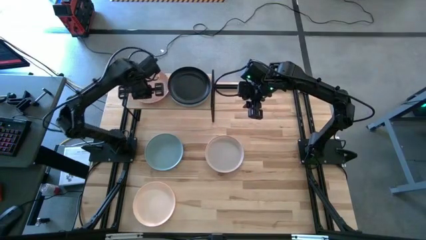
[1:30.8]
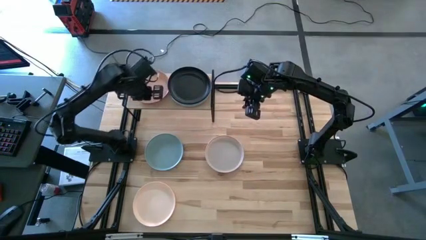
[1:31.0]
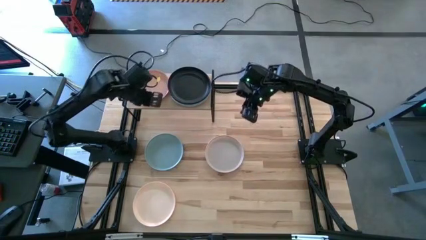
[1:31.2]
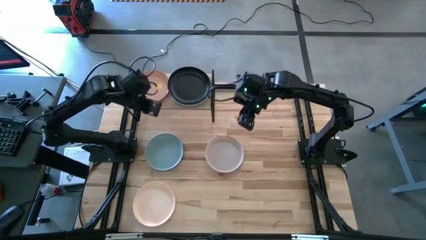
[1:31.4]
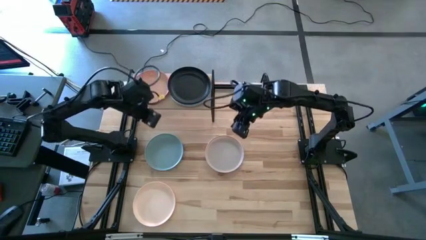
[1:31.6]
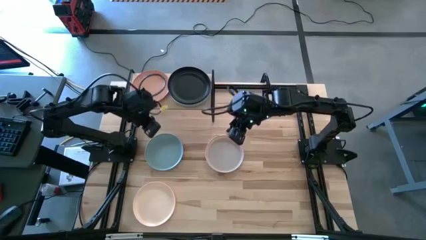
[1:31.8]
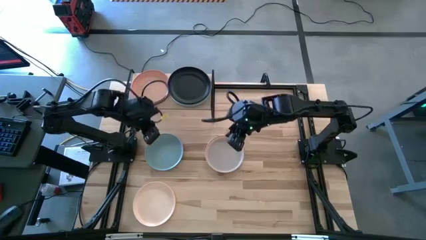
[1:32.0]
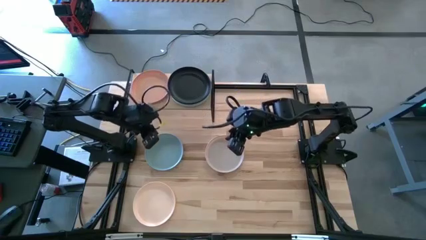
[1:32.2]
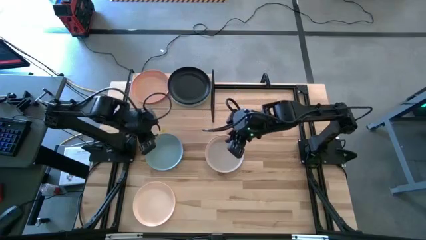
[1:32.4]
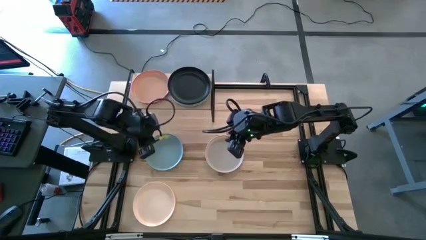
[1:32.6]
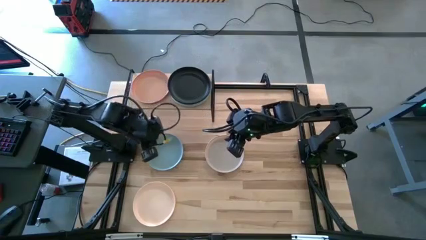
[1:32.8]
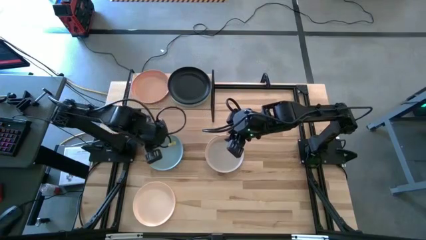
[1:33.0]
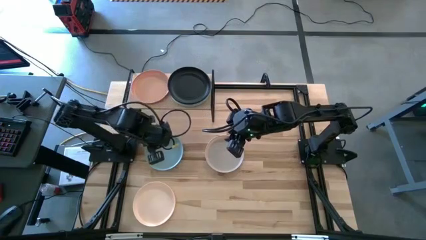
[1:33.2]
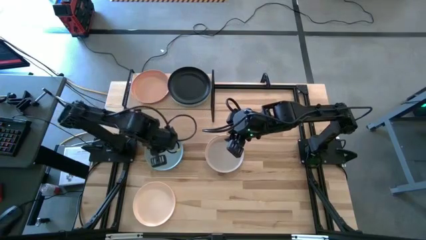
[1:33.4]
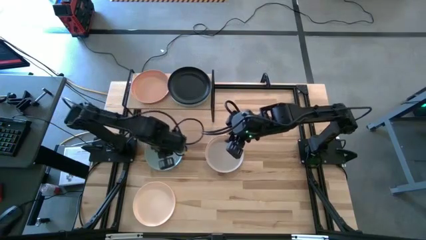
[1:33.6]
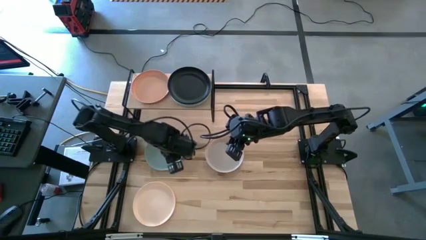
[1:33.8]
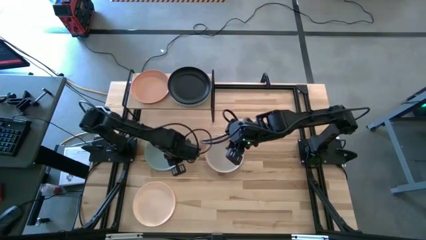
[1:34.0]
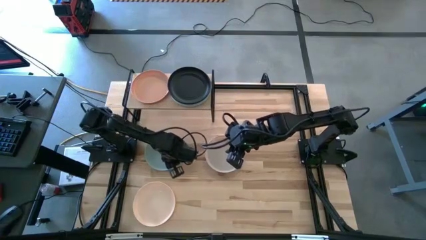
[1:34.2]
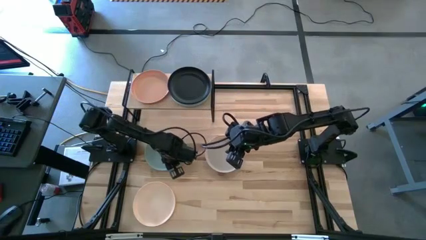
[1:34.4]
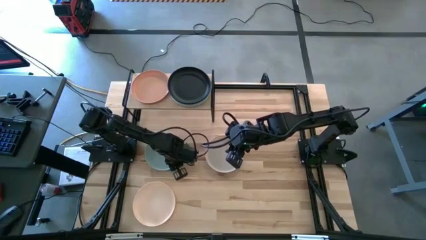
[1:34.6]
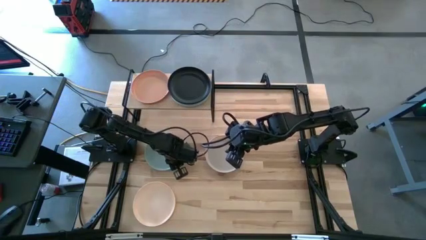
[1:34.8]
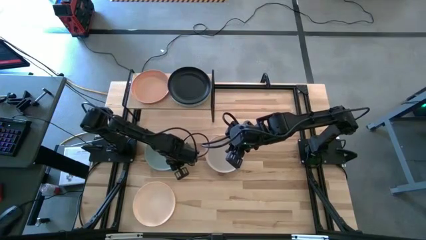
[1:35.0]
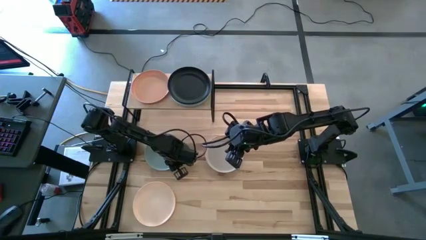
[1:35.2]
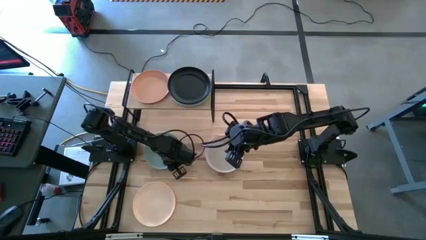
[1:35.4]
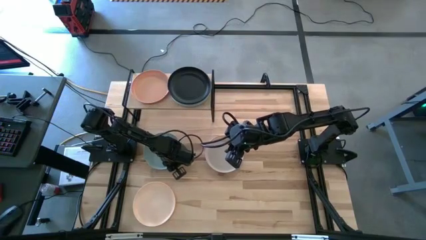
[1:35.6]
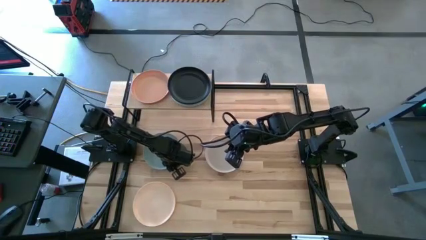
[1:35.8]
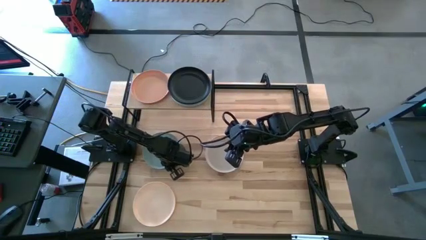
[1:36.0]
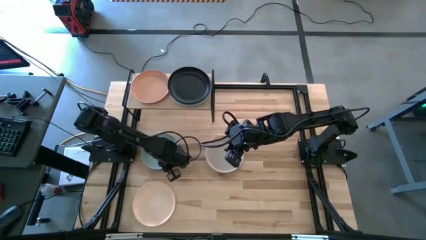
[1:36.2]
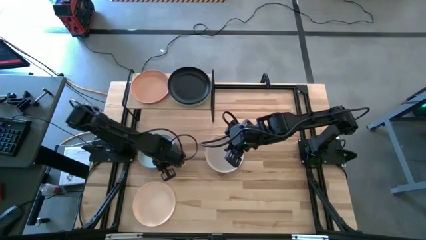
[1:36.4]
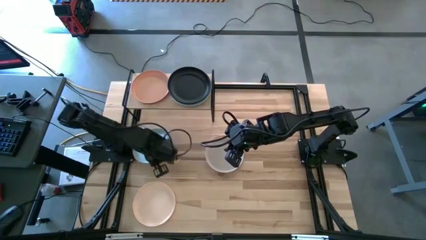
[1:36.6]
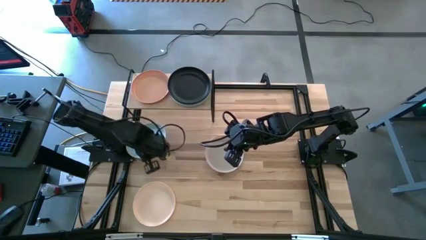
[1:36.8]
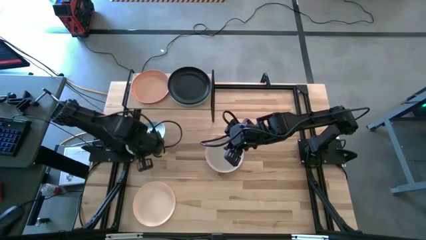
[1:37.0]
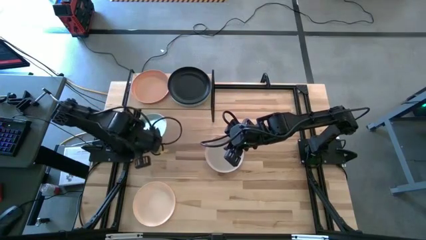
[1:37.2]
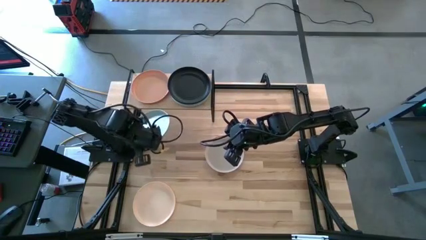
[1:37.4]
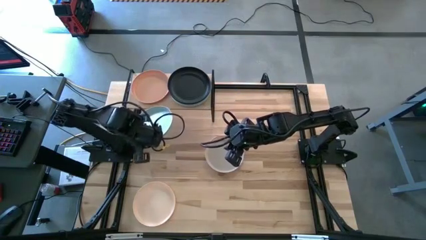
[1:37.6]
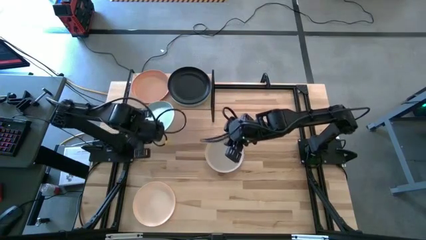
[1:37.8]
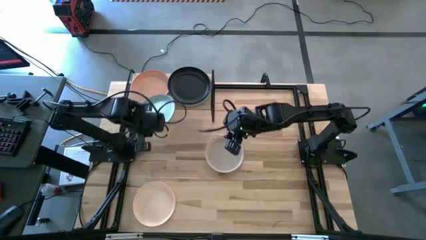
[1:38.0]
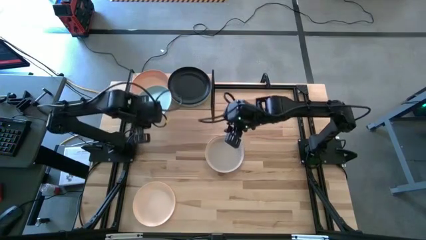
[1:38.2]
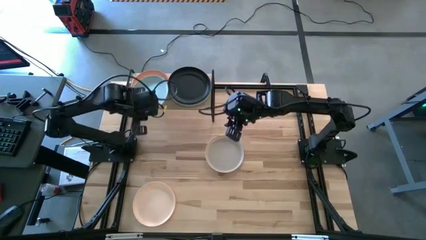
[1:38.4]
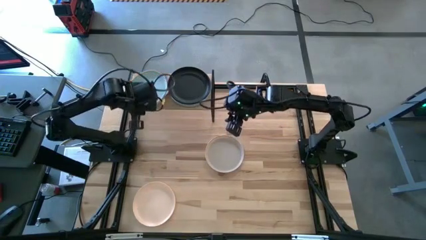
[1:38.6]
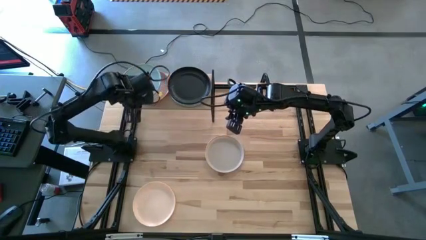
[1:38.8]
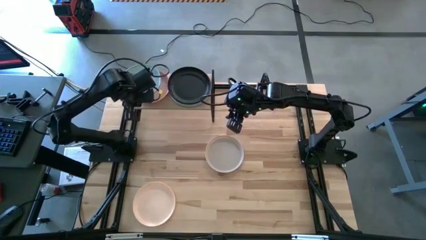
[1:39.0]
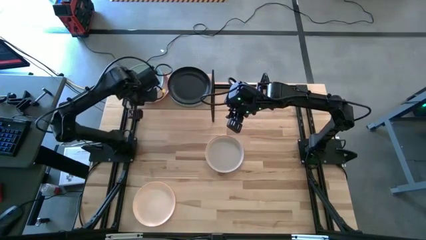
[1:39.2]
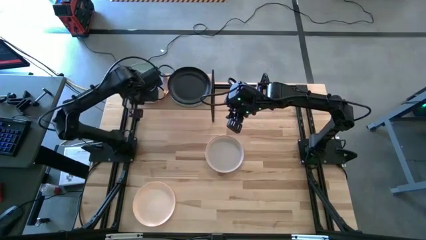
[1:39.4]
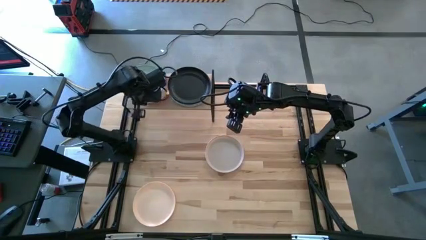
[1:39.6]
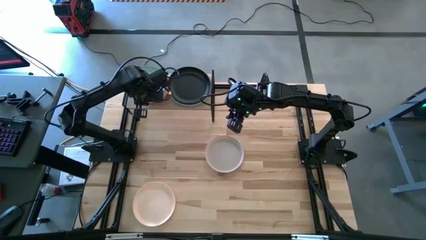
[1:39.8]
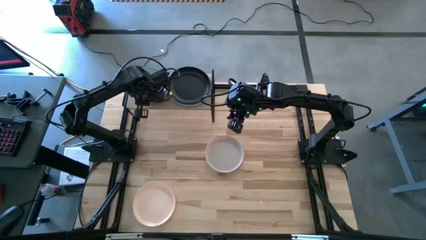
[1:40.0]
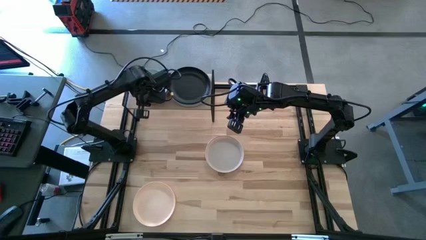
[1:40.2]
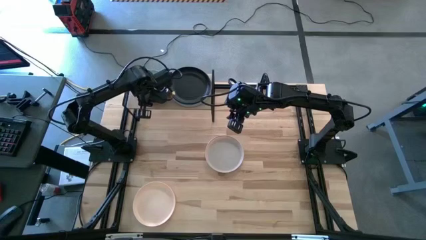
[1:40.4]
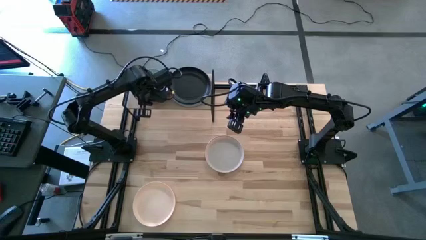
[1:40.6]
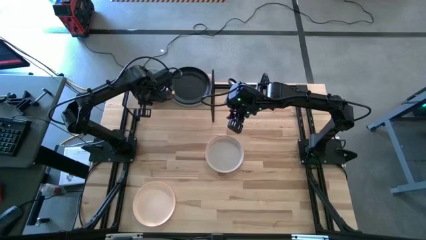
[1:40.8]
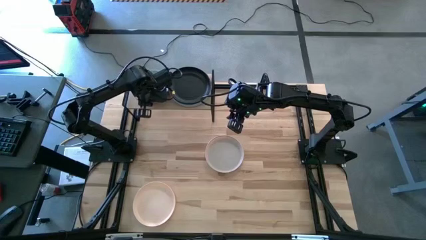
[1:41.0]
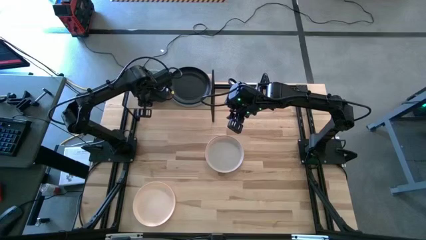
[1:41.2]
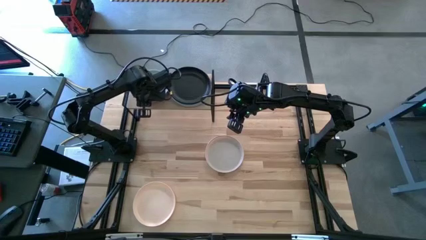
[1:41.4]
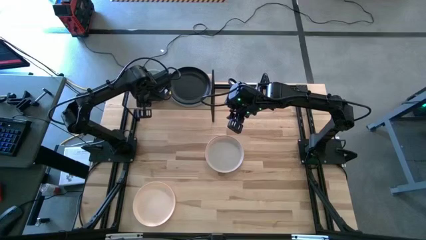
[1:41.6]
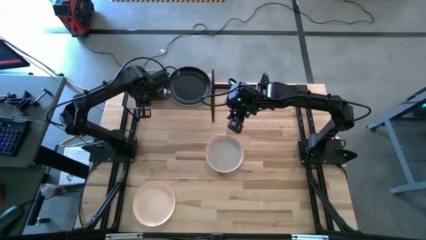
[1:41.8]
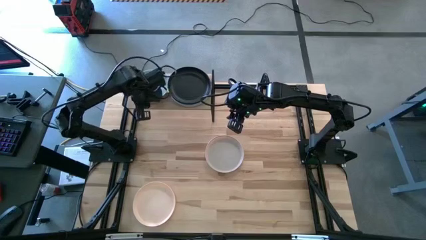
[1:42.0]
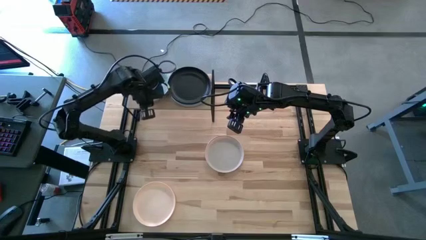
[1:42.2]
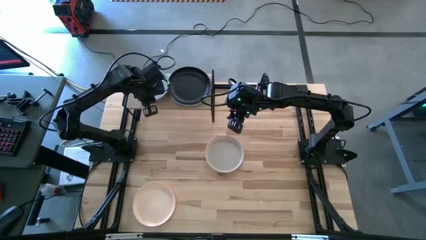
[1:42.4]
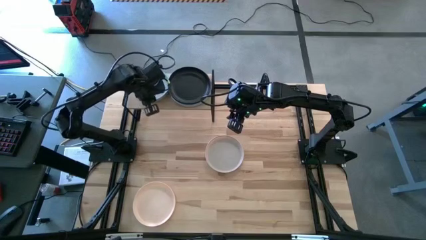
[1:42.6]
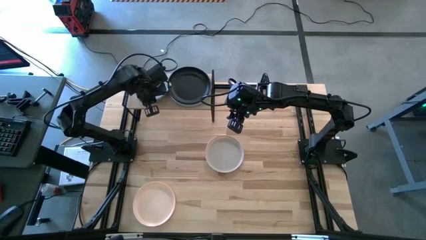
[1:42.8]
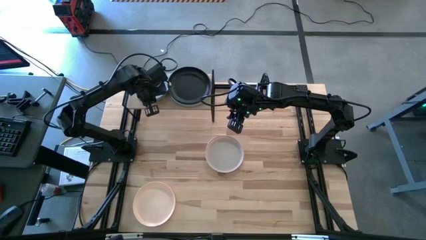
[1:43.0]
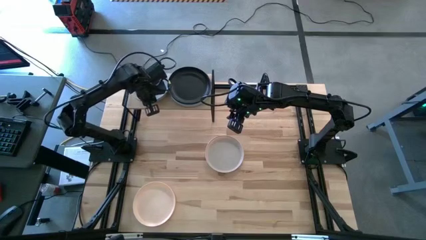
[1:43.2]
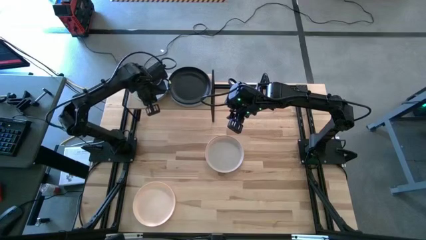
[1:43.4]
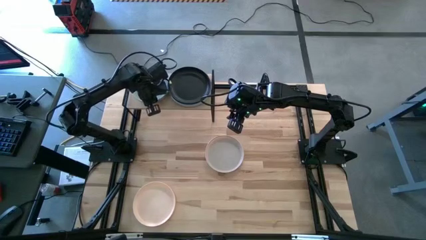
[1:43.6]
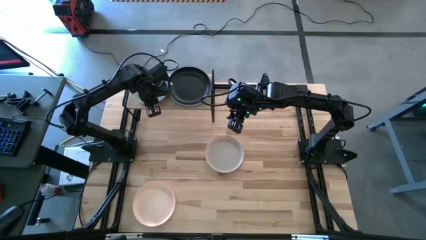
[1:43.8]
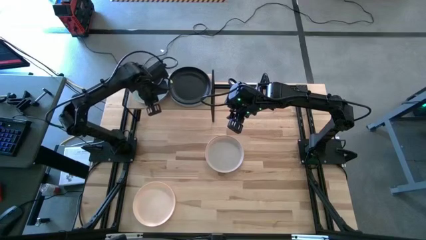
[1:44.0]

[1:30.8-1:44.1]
Task: Place and stack plates onto a shelf
Stack the light blue plate on top of the orange plate on the shelf

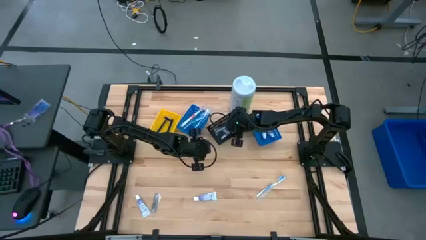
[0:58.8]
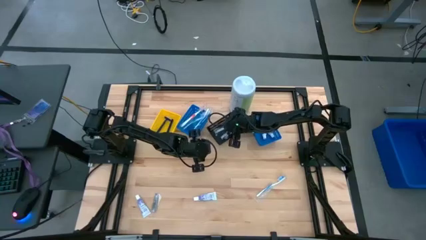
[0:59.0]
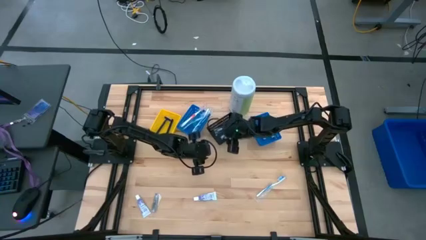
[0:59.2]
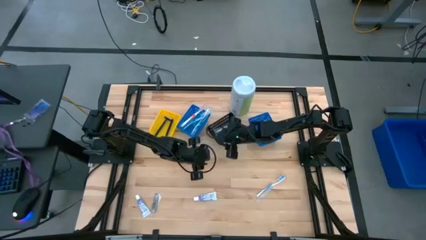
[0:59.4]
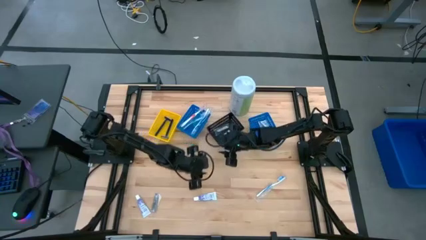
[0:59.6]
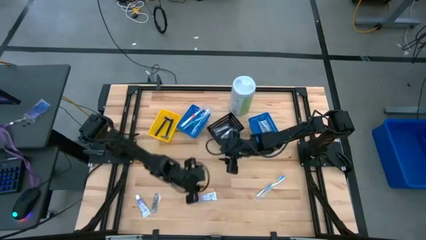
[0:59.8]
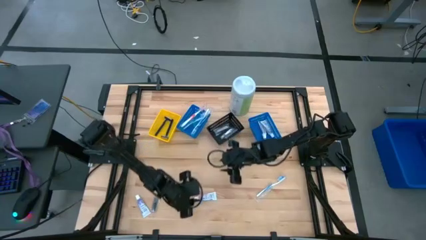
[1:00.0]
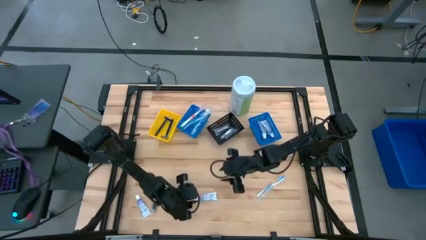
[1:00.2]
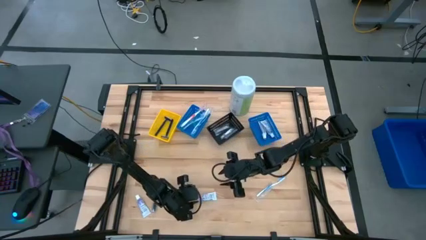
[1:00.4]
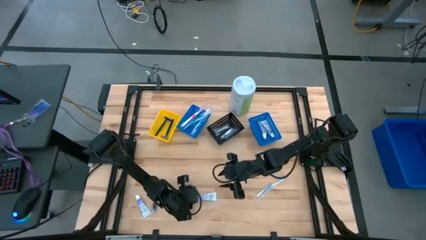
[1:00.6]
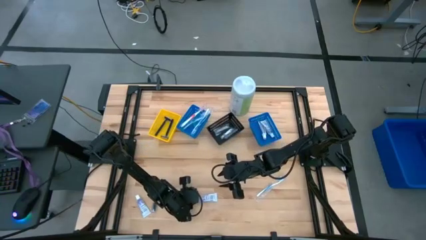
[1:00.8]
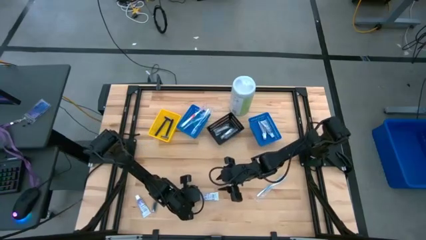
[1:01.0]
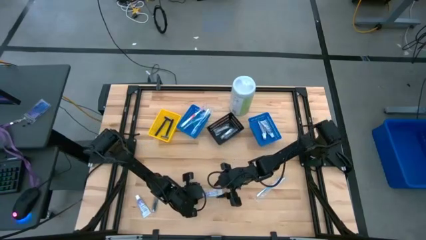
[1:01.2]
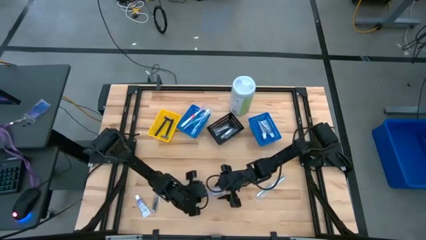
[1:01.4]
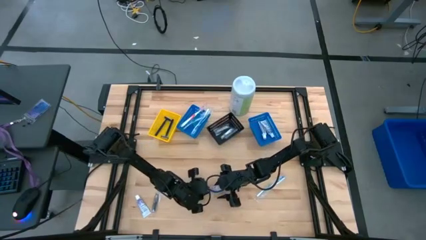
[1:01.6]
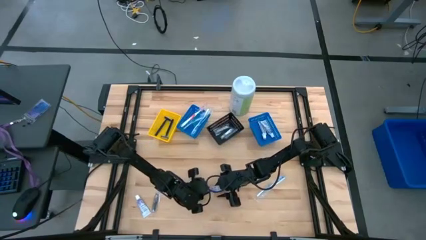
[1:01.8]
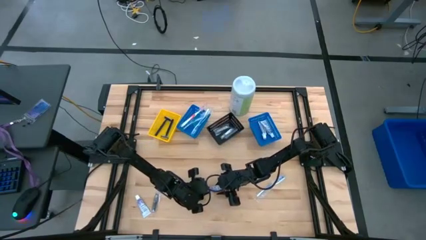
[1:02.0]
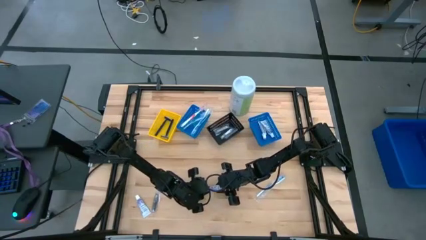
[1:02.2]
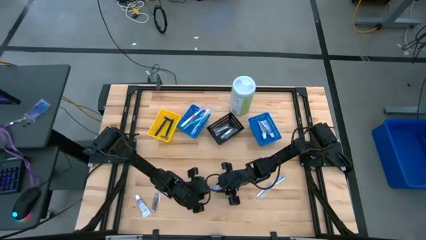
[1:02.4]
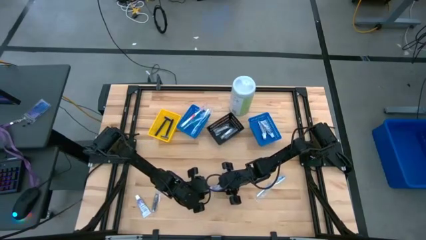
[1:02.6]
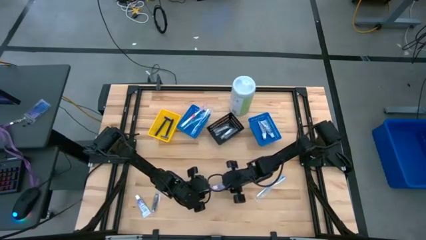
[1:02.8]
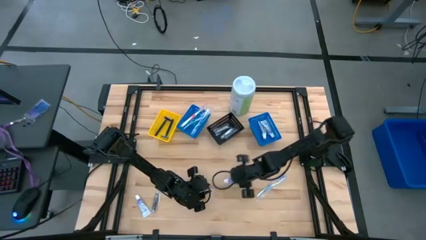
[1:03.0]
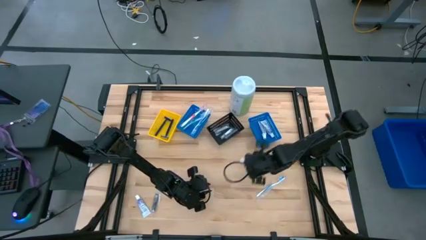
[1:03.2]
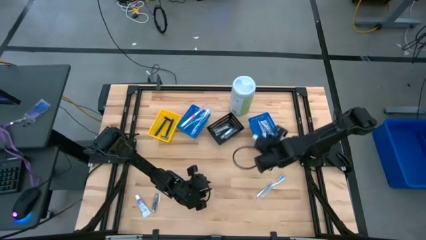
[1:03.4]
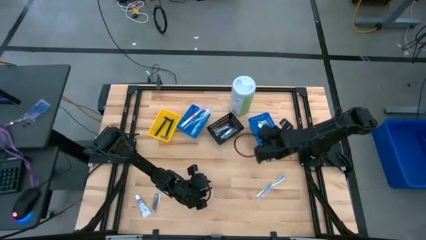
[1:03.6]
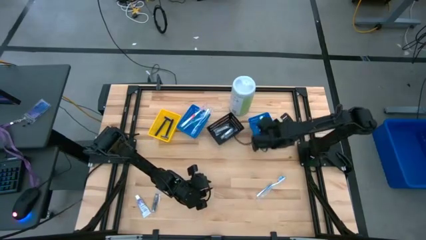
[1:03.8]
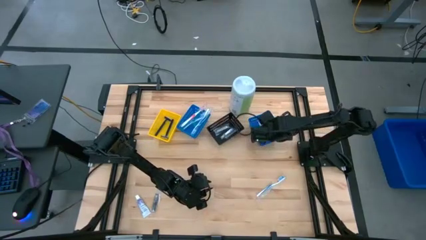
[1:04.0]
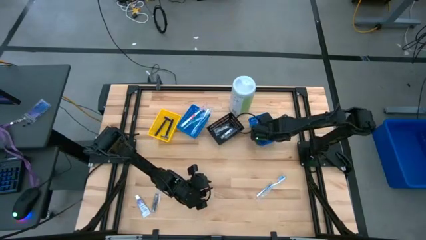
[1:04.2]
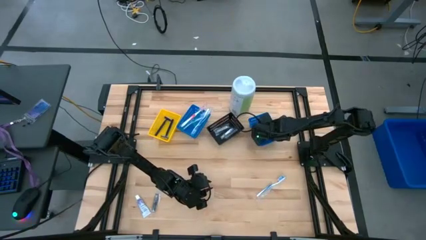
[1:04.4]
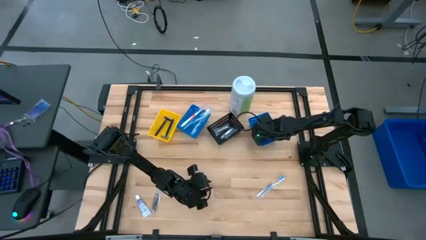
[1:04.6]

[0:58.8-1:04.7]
Task: Pick & Place Travel size toiletries
Put the white toothpaste into the right blue basket
